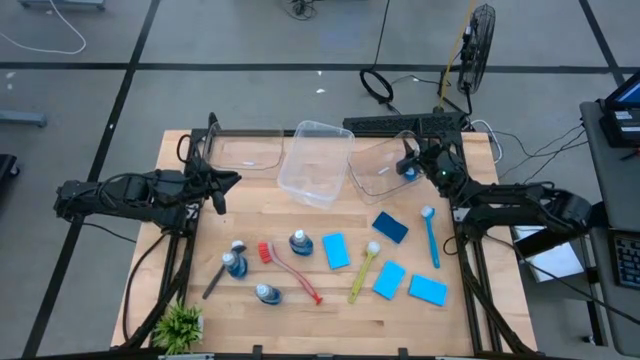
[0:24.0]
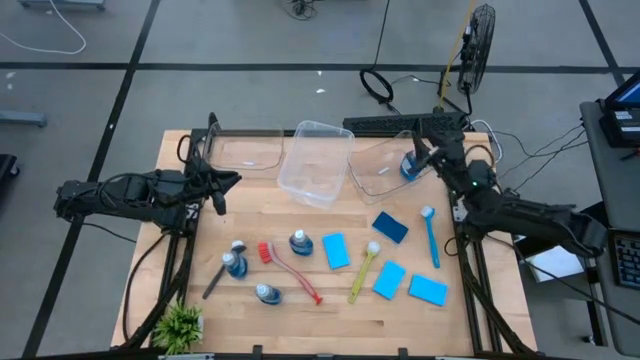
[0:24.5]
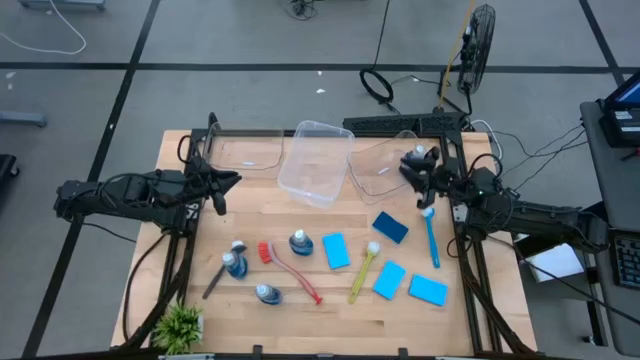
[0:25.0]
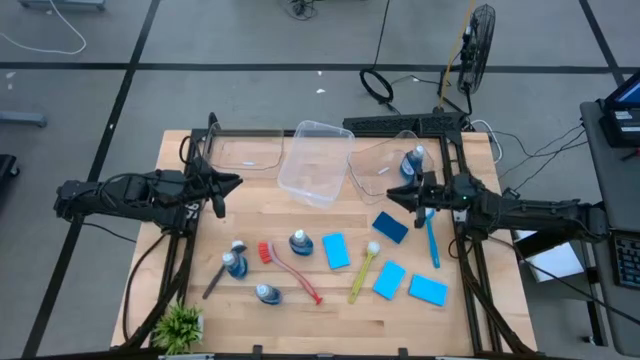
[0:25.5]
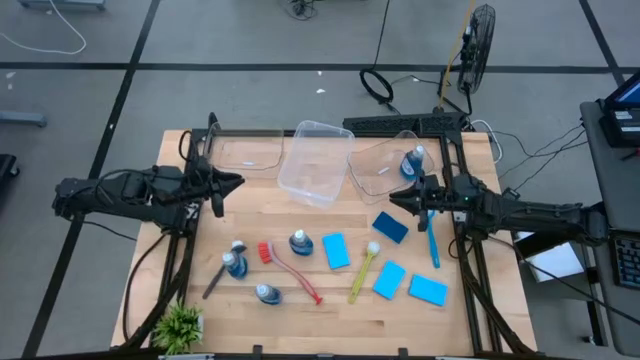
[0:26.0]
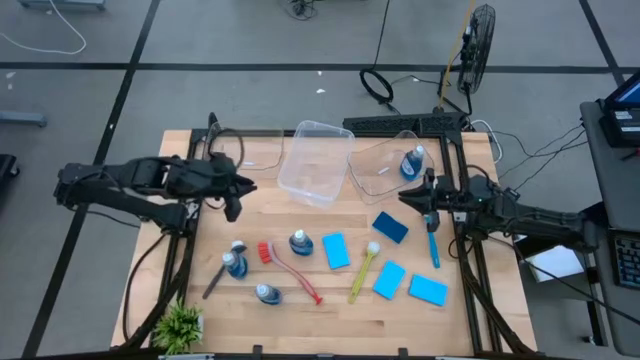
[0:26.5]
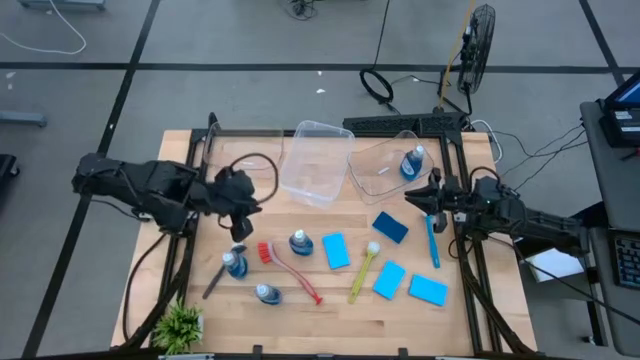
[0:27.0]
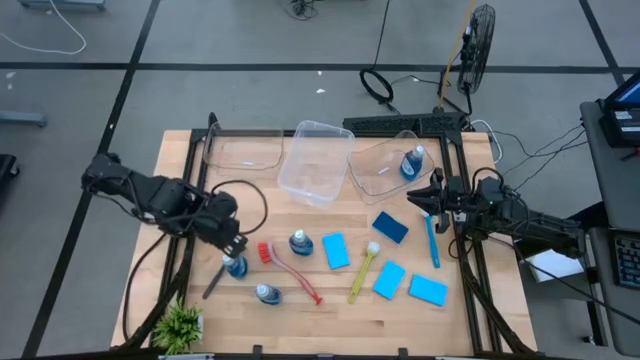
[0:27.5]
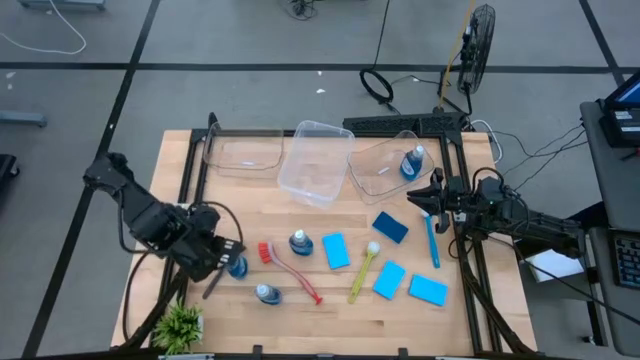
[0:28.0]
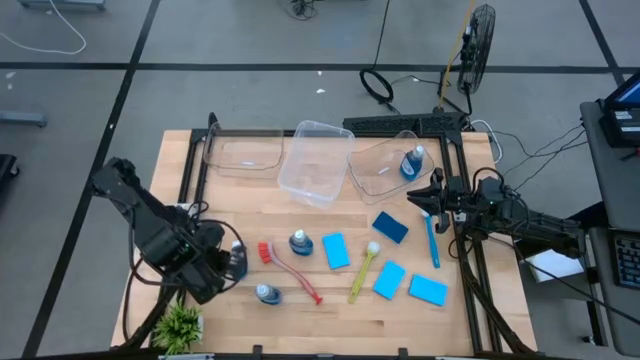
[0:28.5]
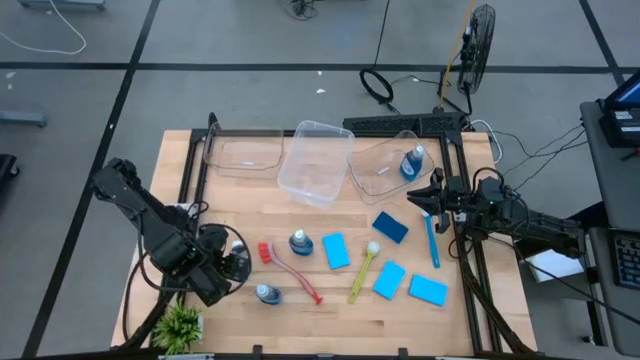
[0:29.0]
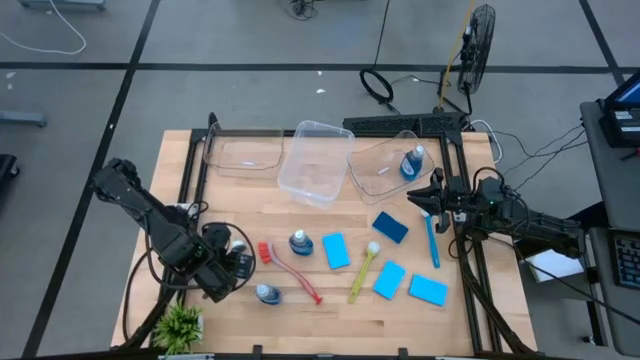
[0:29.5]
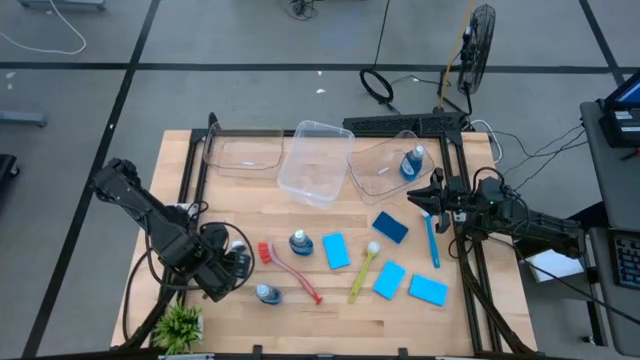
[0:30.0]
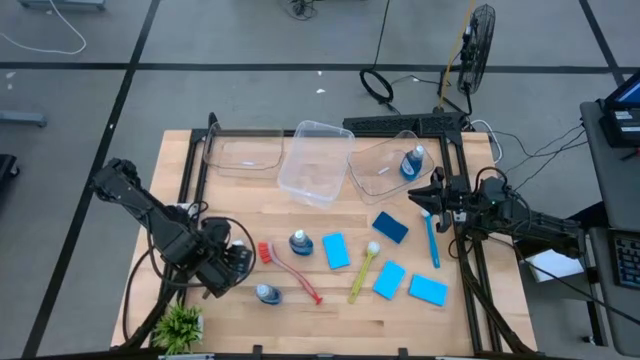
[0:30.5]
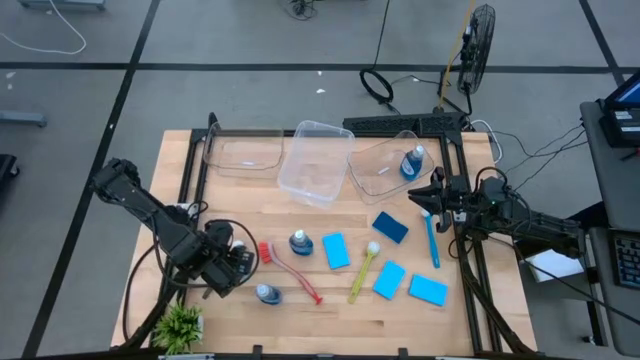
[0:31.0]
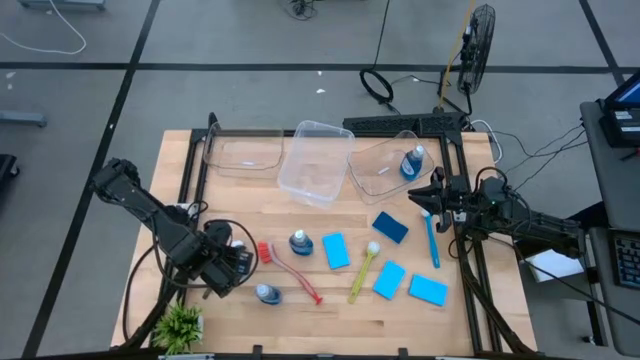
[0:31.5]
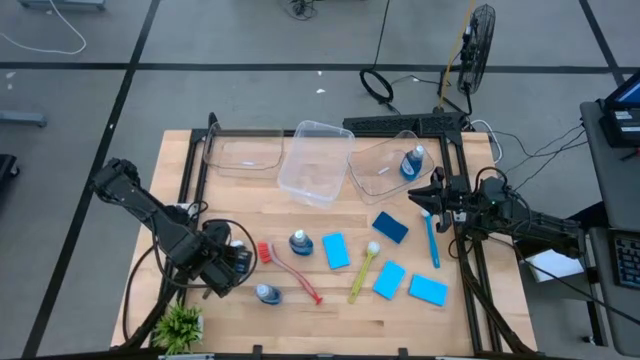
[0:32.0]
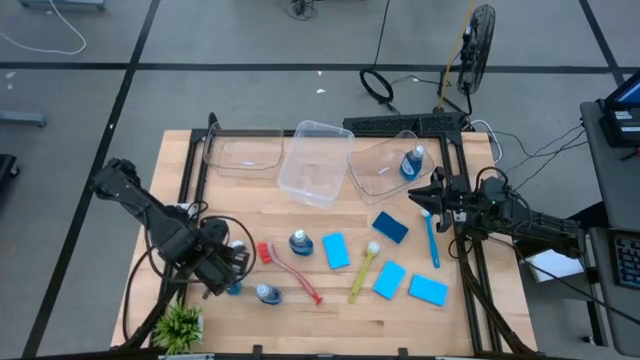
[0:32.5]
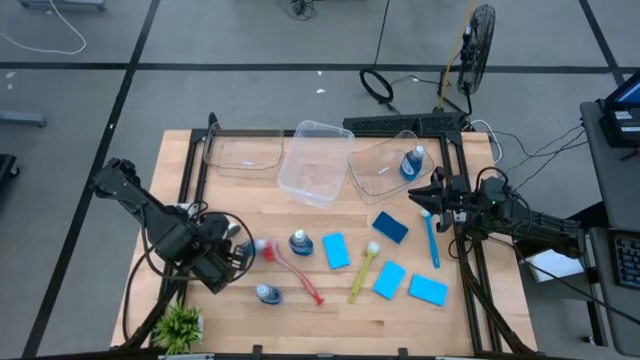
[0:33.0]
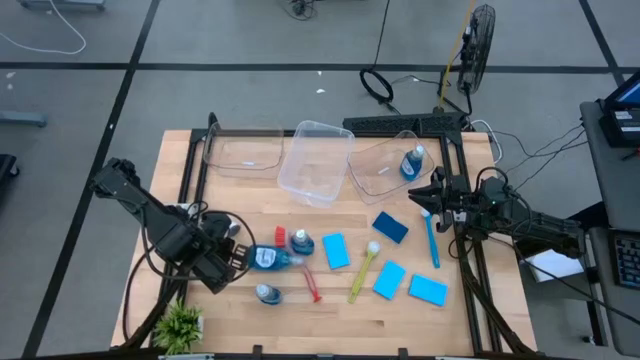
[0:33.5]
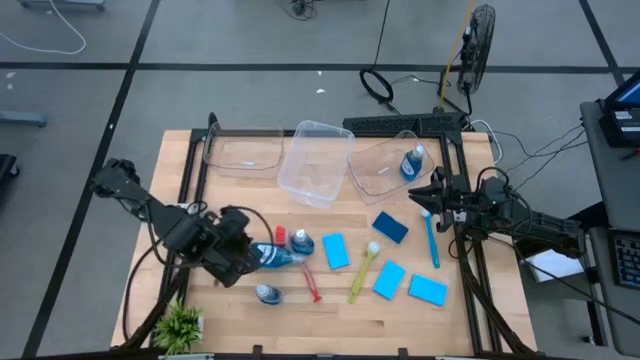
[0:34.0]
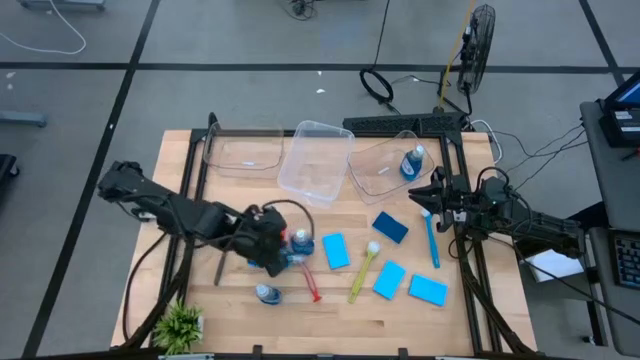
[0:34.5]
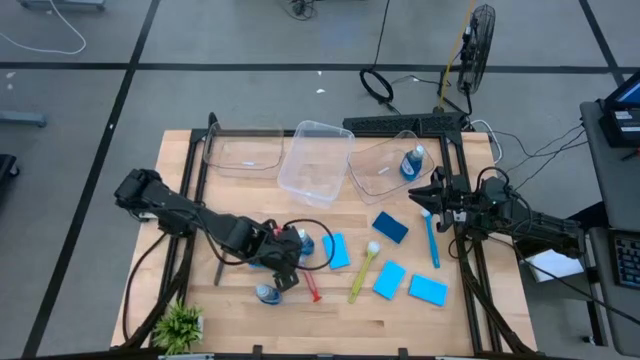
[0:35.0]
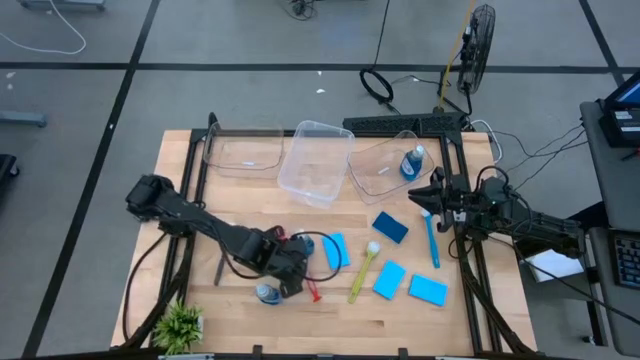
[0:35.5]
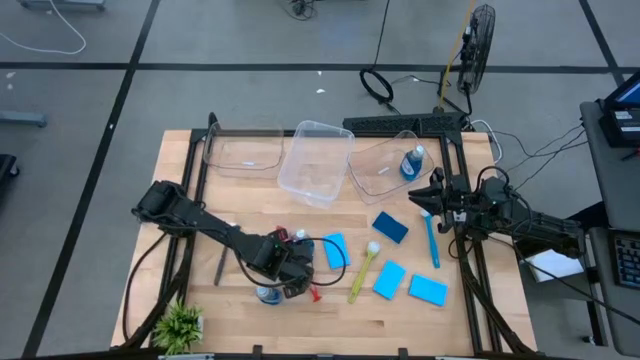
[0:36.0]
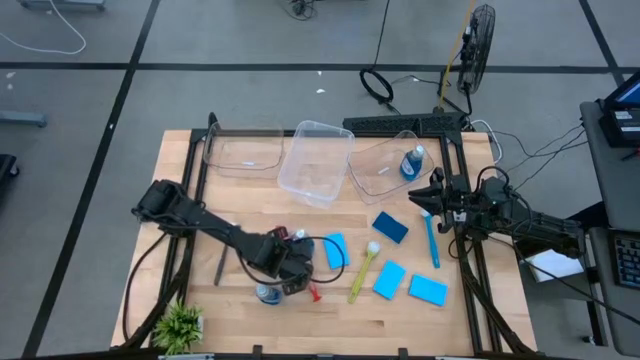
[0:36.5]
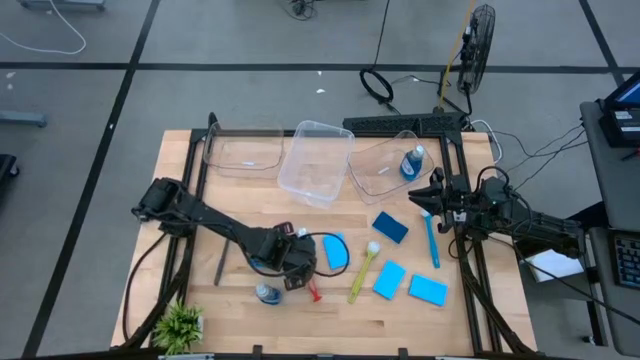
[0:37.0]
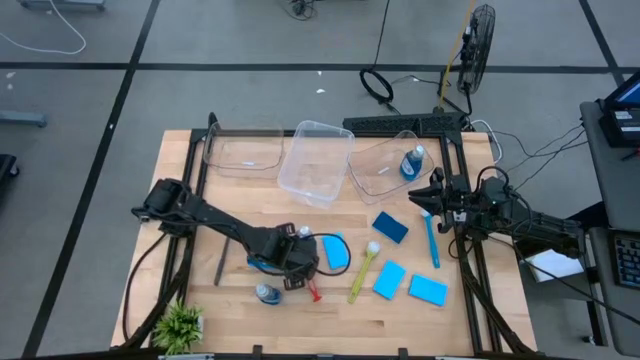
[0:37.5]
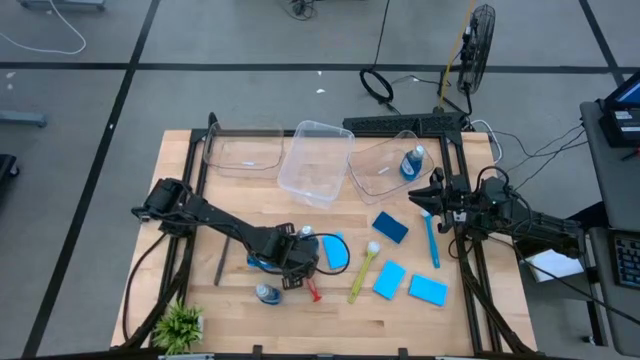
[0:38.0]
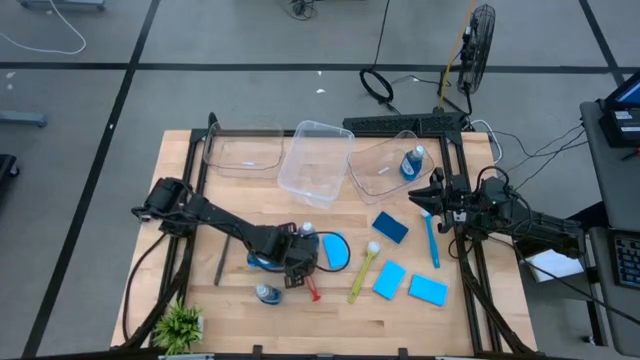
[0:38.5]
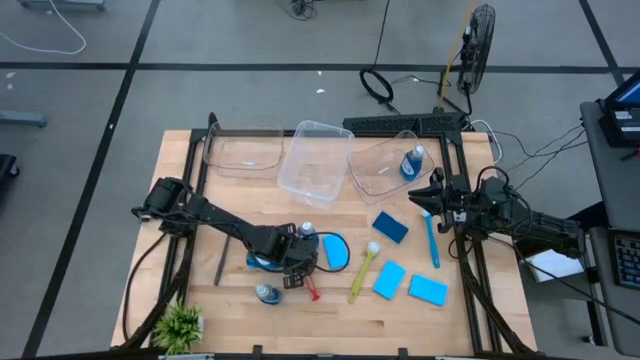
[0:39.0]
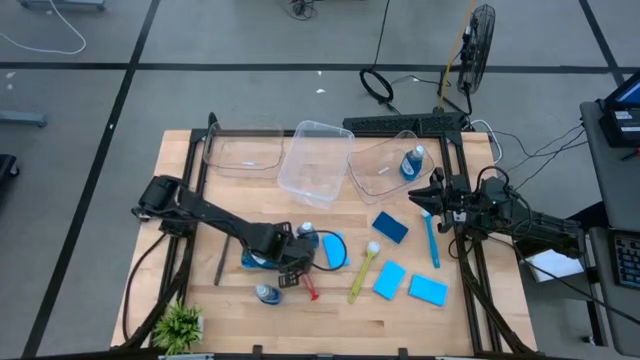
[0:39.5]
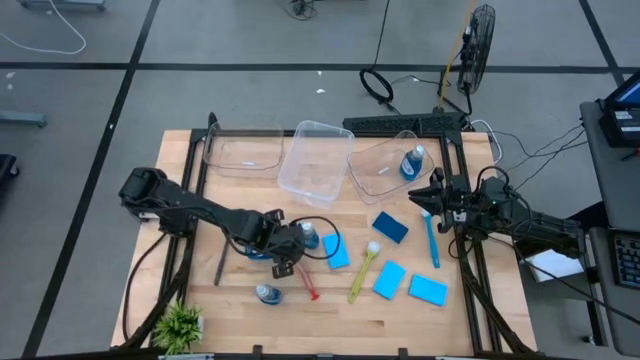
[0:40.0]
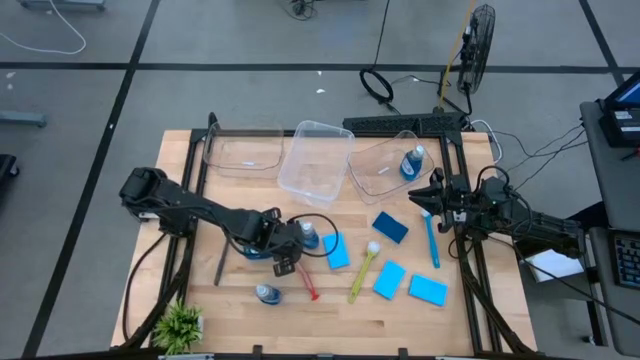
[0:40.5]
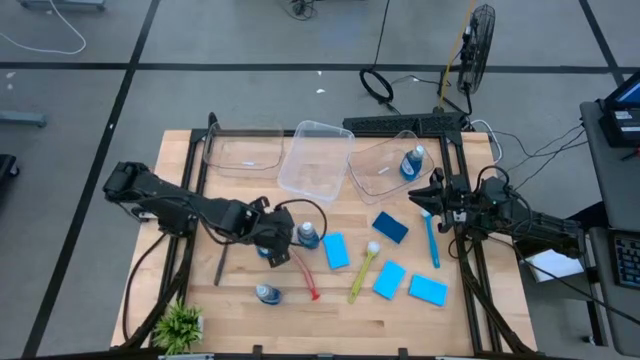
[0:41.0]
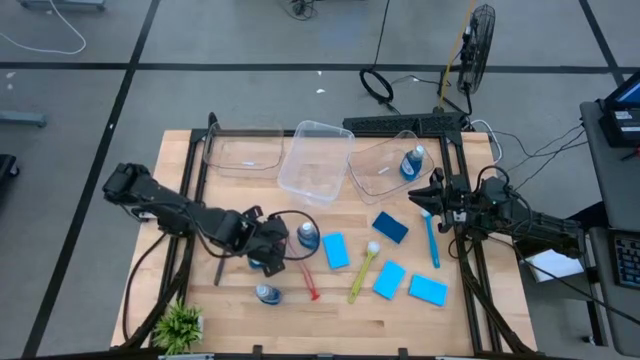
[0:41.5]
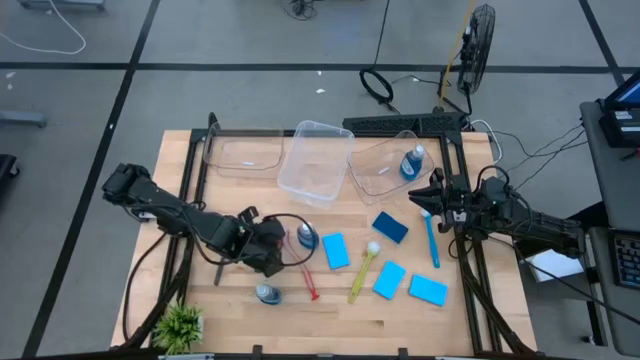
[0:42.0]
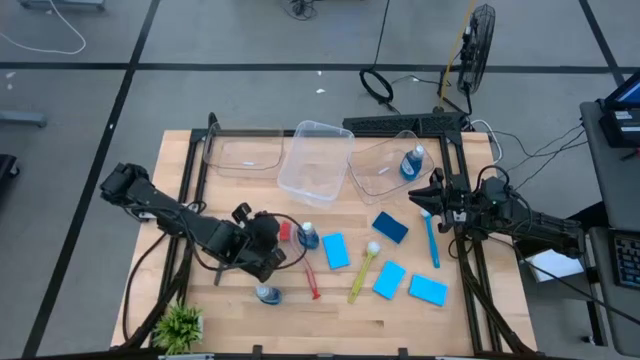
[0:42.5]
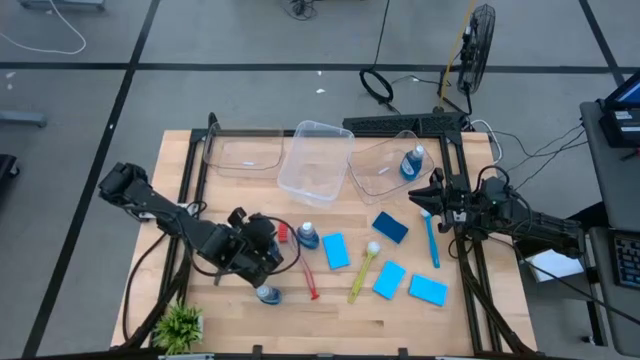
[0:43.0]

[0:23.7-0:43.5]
Task: Pick & Place Kitchen Sink Supplies
Put the blue dish soap into the right transparent bin

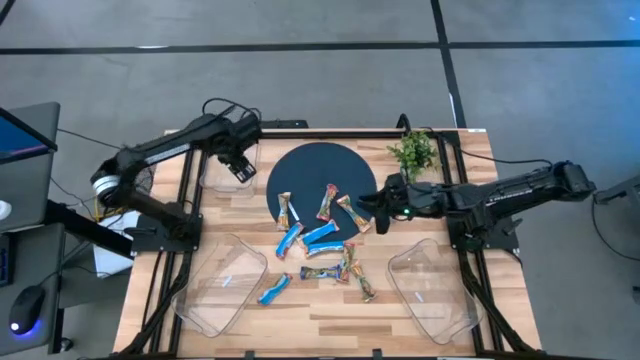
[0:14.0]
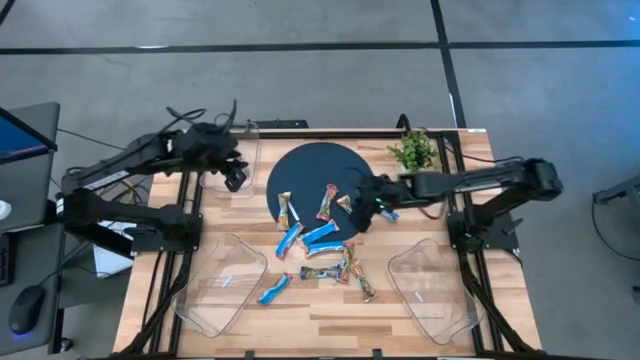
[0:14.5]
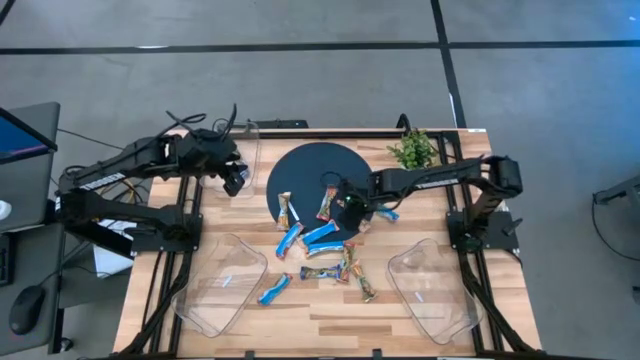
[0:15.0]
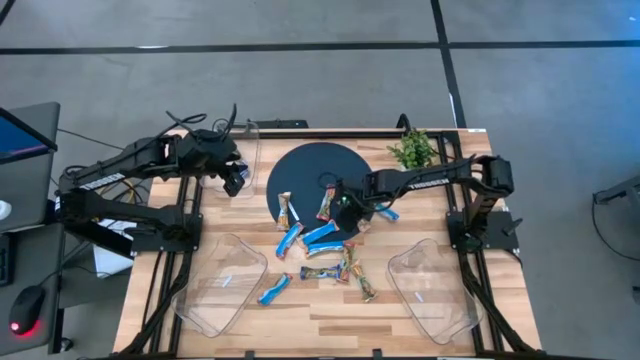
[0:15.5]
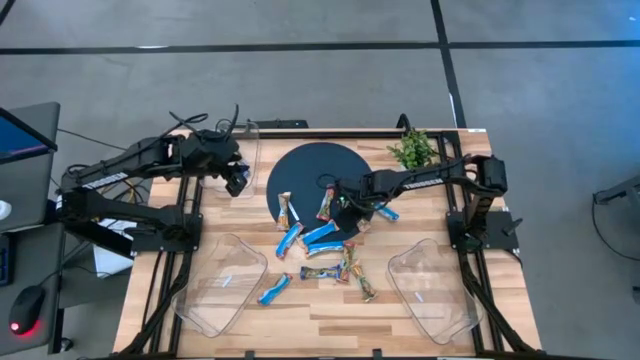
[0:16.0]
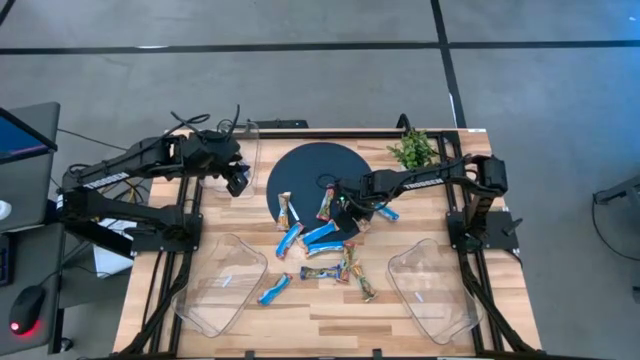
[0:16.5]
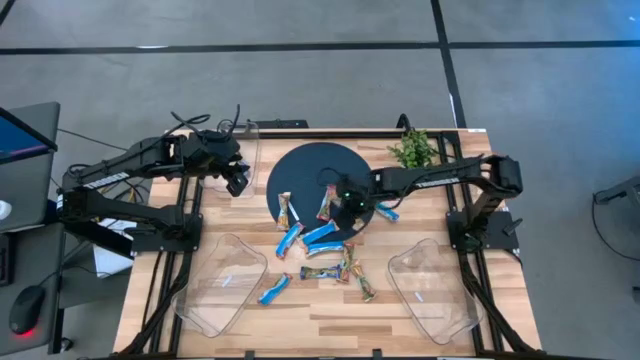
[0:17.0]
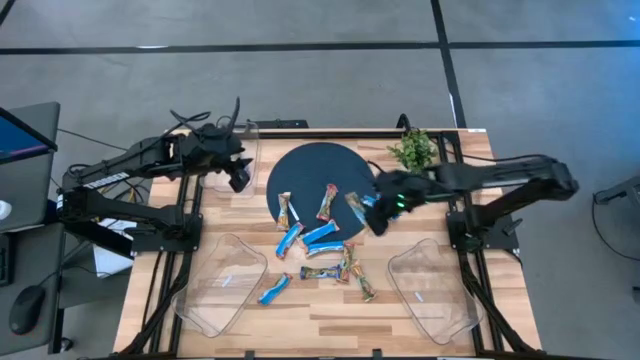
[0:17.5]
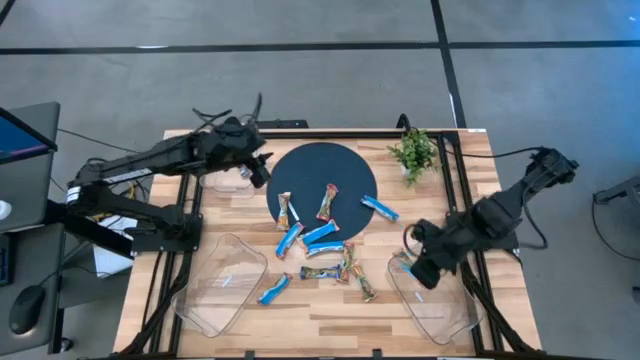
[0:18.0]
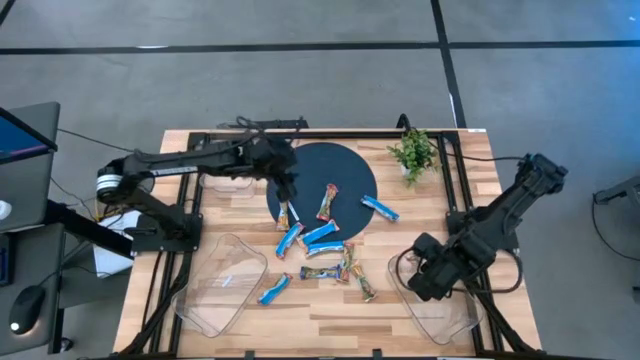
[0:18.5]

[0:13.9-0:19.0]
Task: Pick and place Granola Bars by type
Put the yellow granola bar into the bottom right transparent bin
